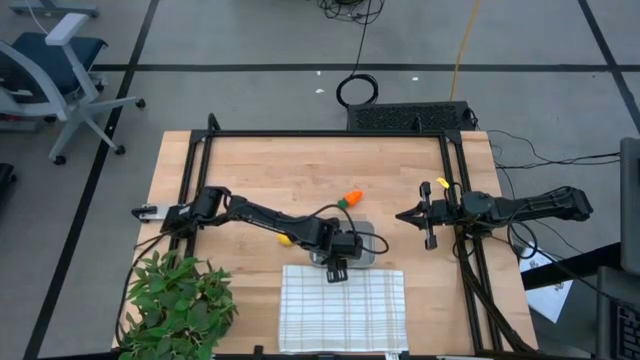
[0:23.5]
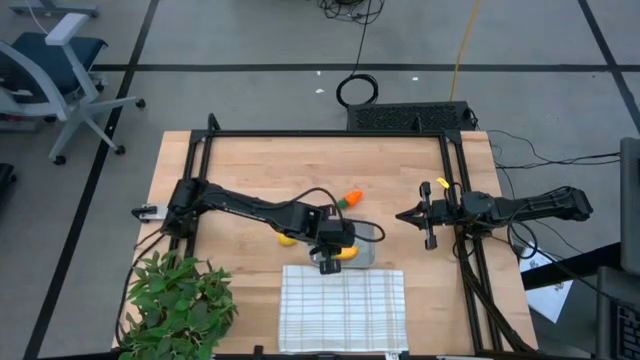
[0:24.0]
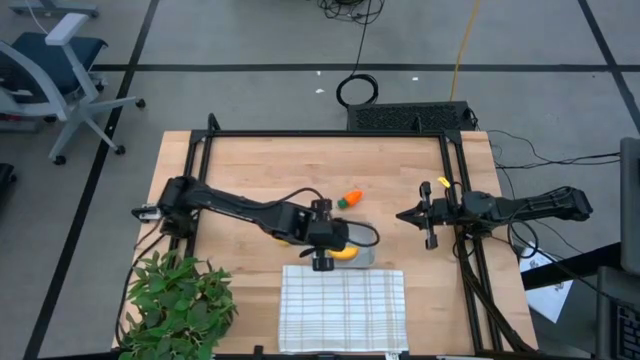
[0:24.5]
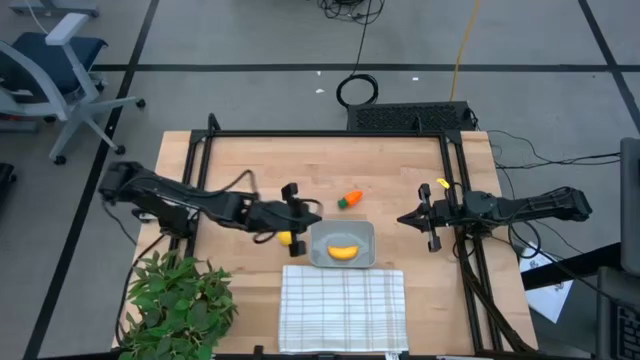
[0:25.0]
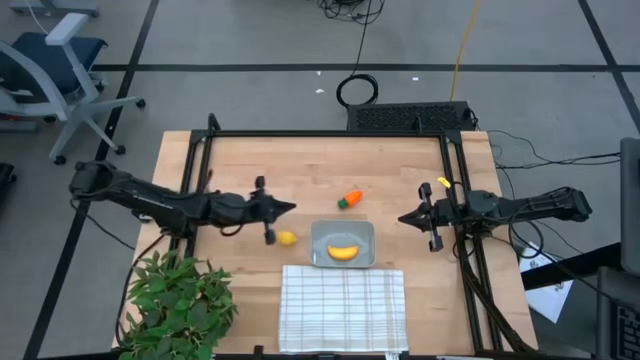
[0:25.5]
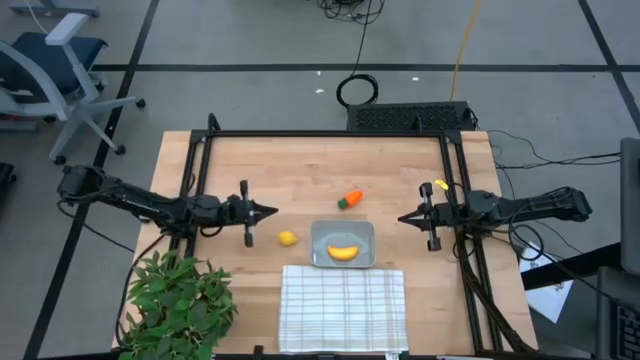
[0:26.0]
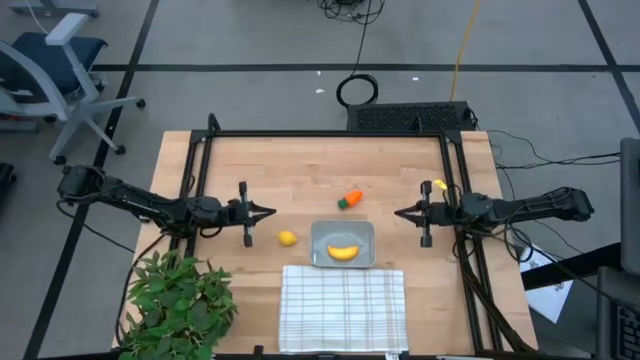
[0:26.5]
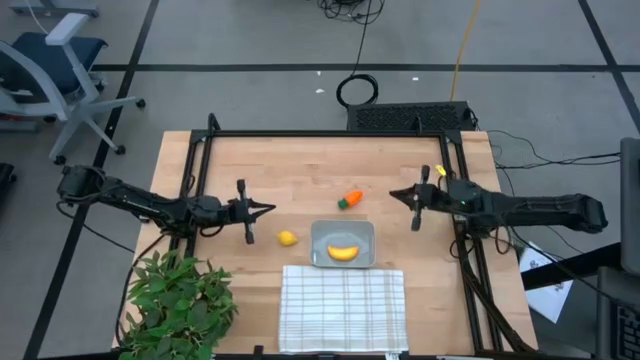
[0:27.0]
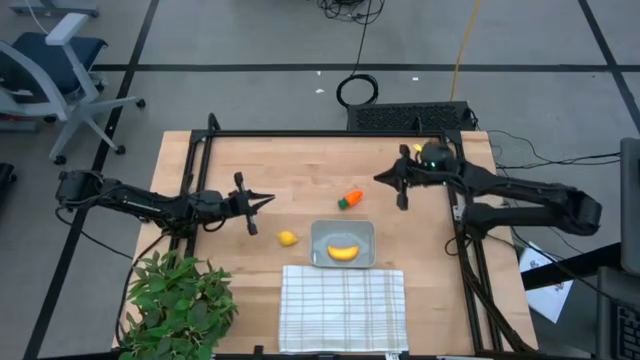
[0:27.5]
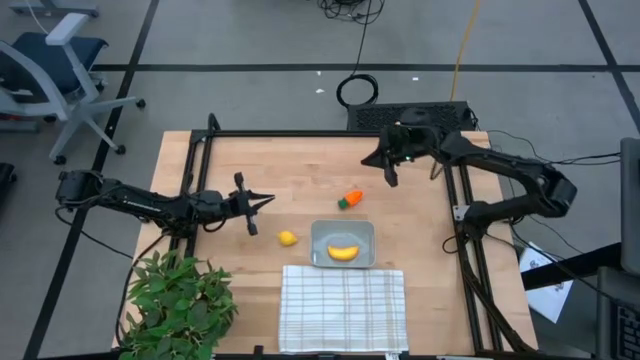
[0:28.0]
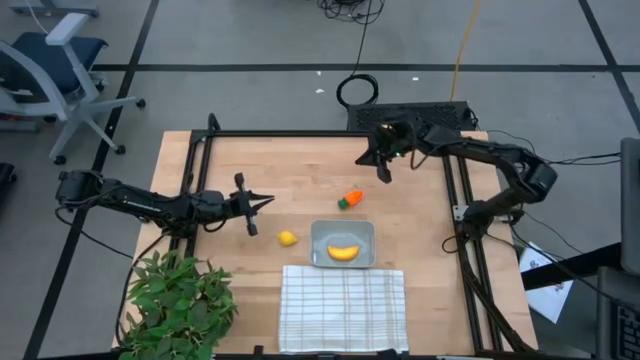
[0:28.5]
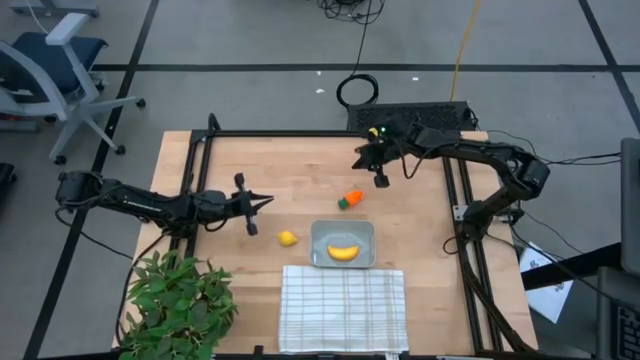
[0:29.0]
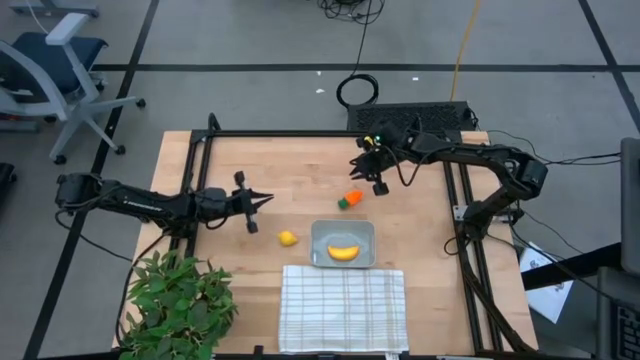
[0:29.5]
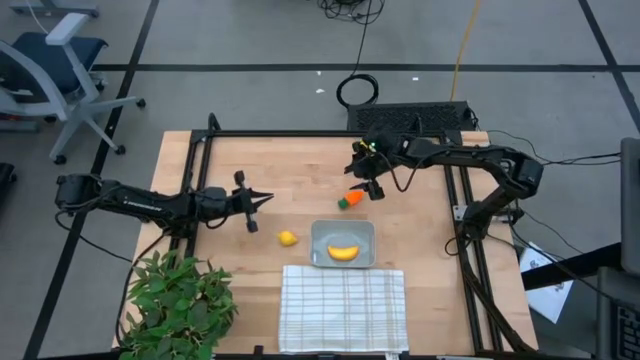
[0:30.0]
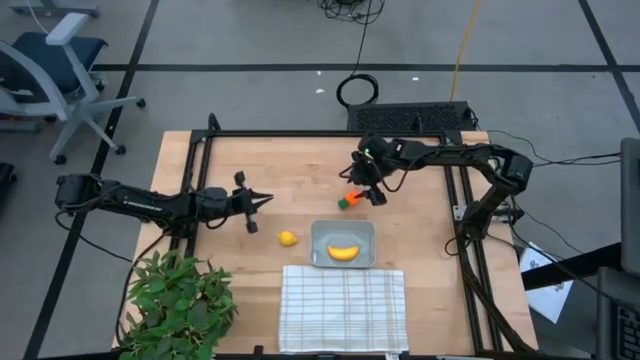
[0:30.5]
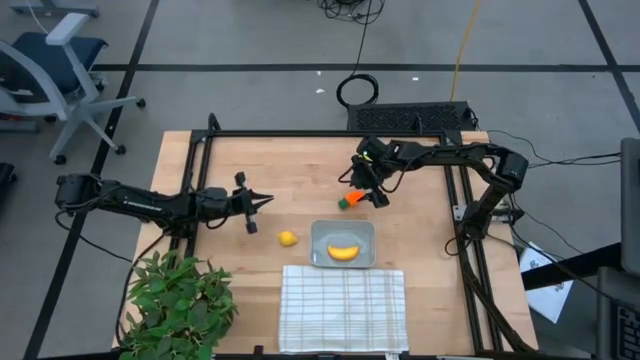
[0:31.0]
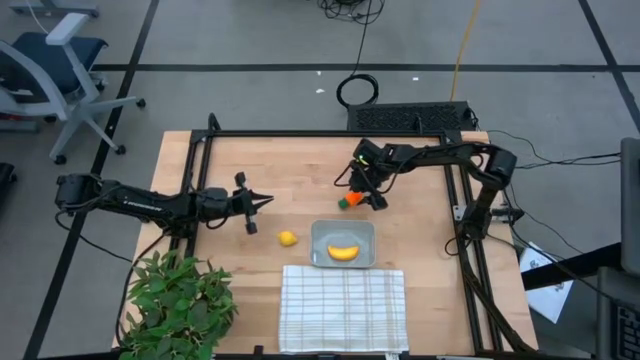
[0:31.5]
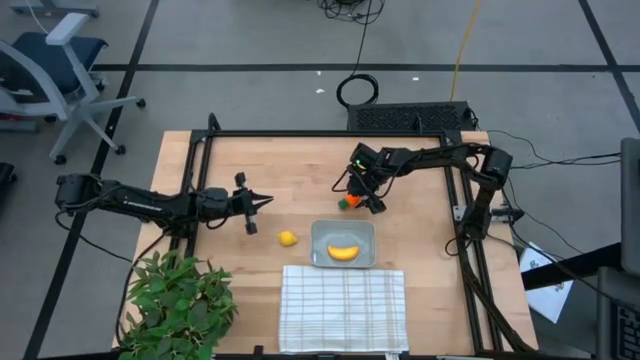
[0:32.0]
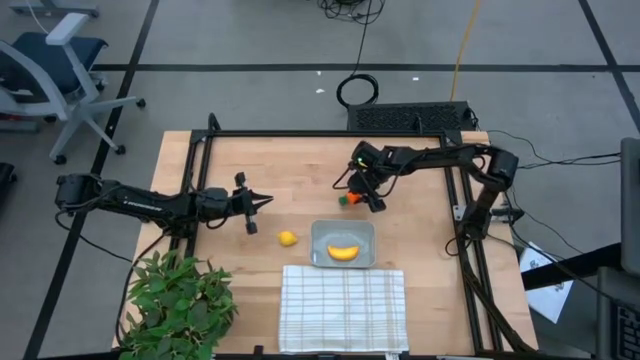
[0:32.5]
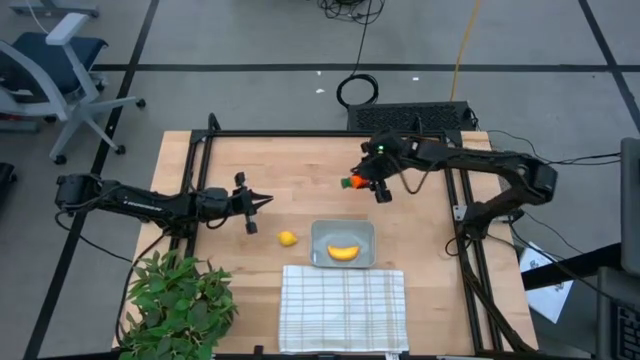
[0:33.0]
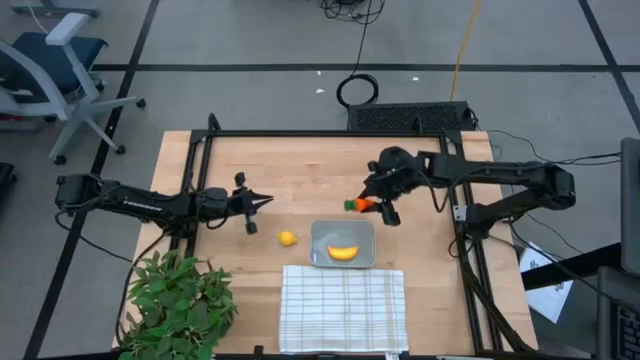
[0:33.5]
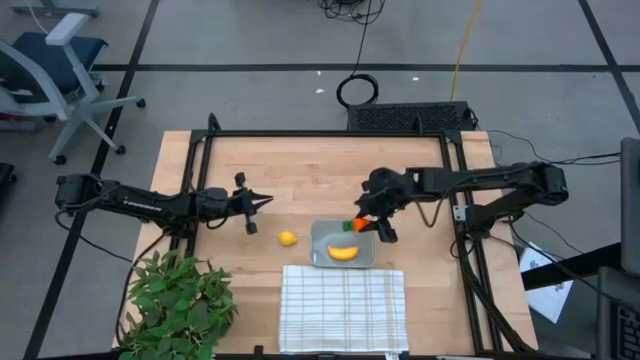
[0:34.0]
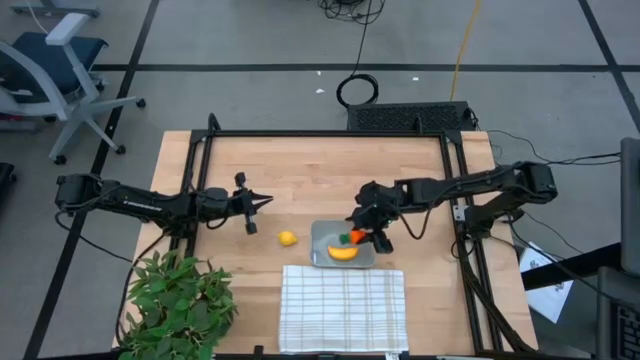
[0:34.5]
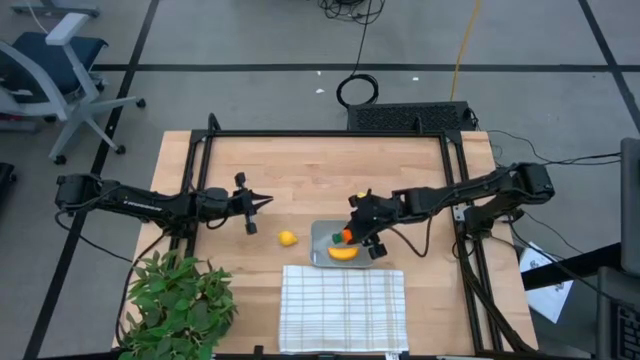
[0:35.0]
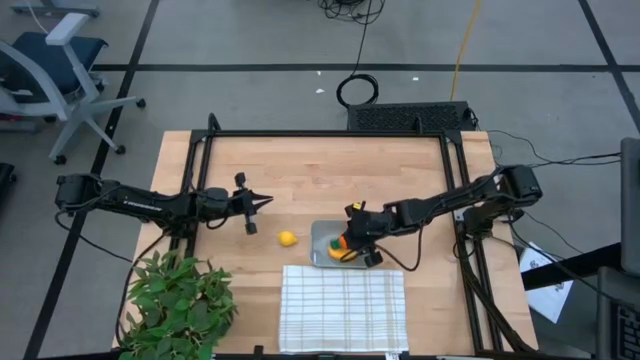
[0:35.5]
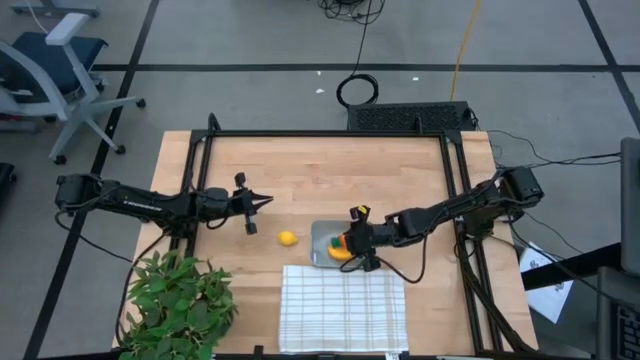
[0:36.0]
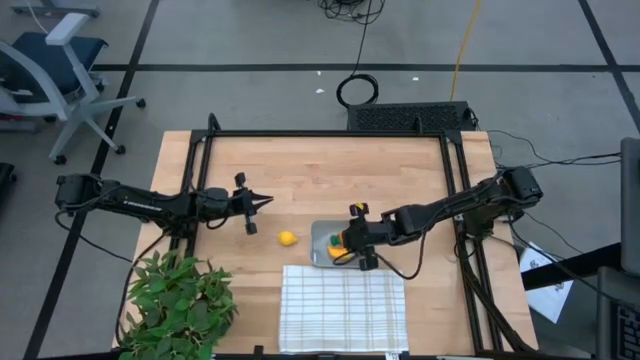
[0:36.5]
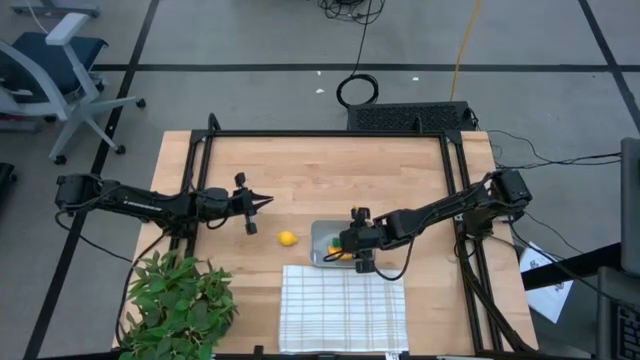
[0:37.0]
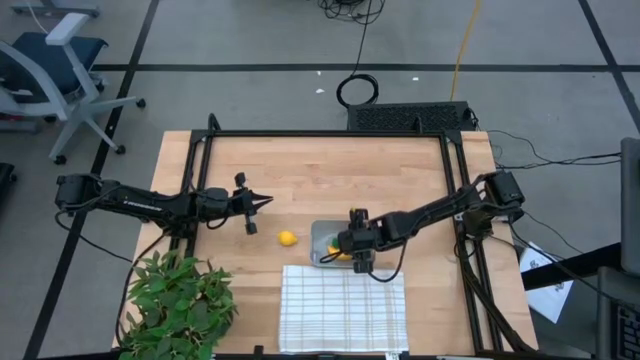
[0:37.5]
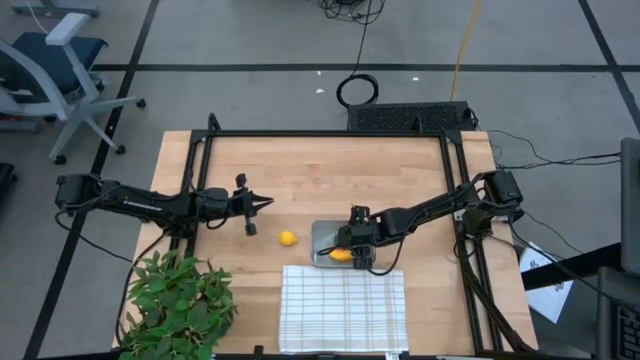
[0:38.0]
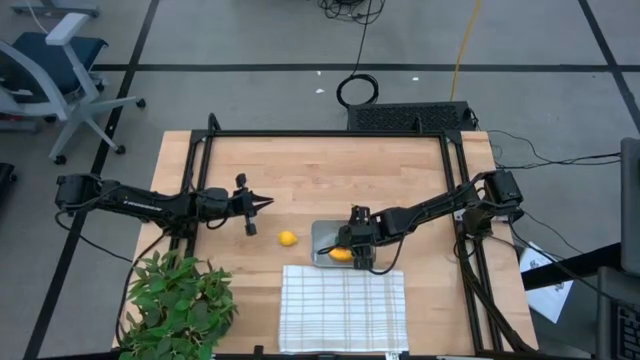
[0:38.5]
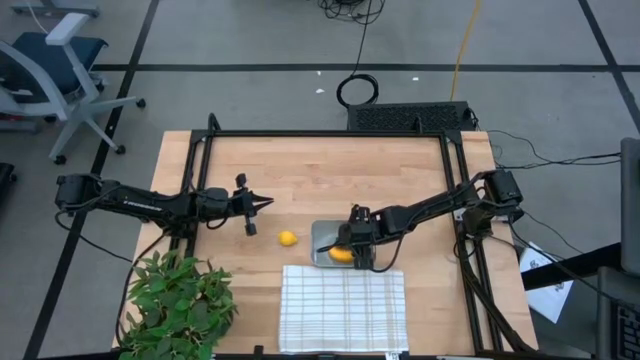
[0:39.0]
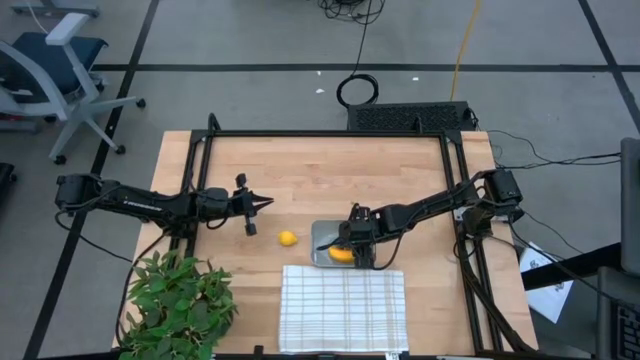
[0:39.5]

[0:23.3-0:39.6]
Task: Pick and placing Produce into tupperware
Put the orange carrot into the gray bin
